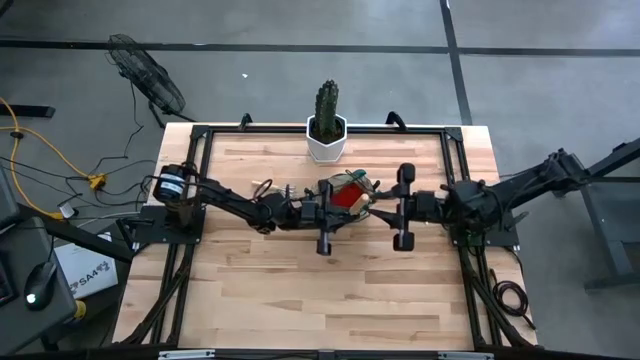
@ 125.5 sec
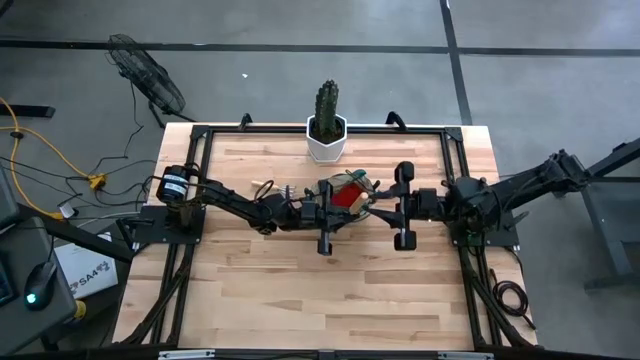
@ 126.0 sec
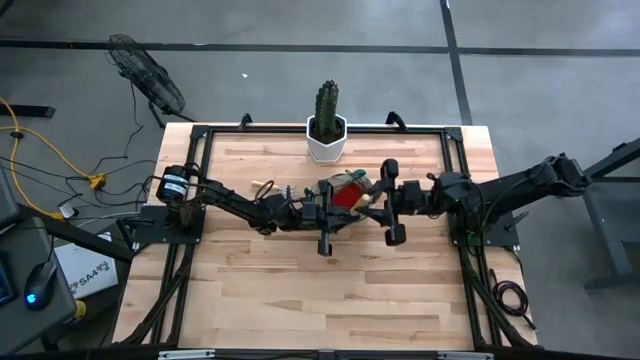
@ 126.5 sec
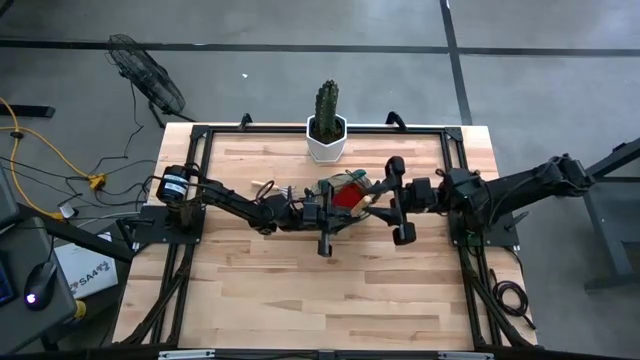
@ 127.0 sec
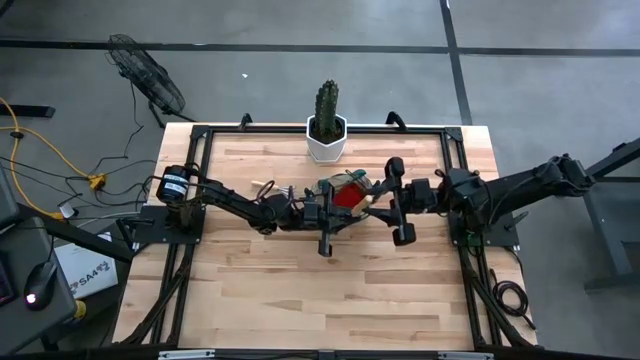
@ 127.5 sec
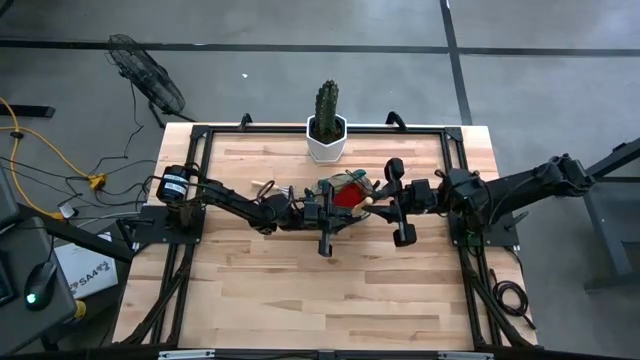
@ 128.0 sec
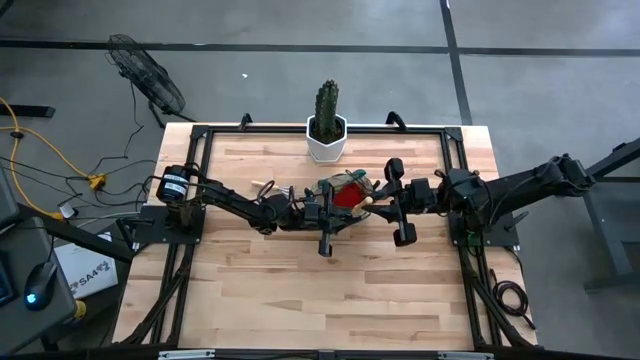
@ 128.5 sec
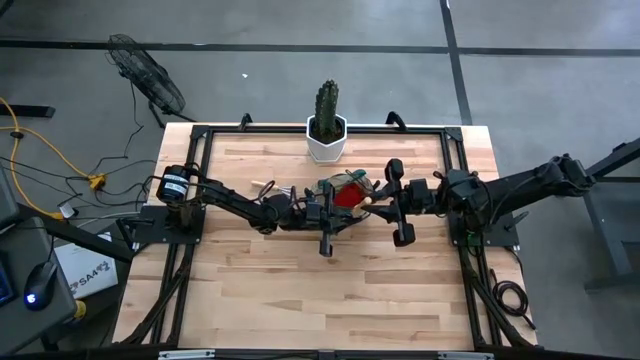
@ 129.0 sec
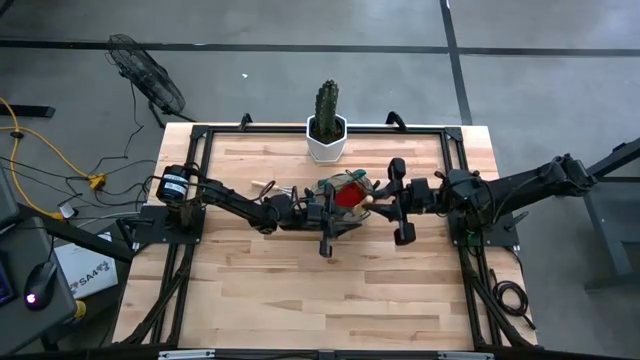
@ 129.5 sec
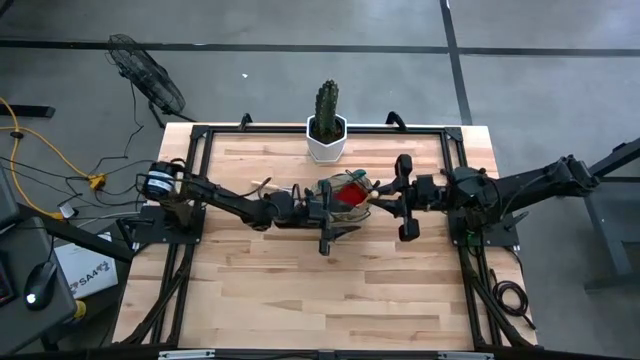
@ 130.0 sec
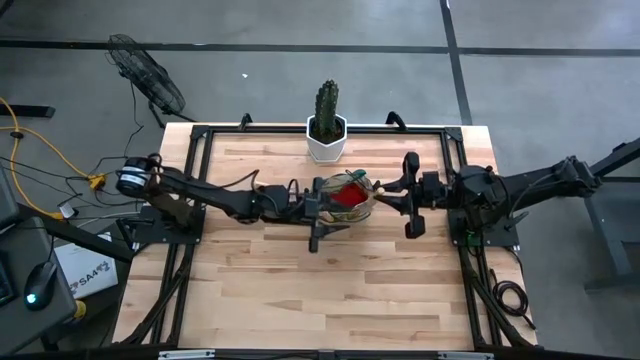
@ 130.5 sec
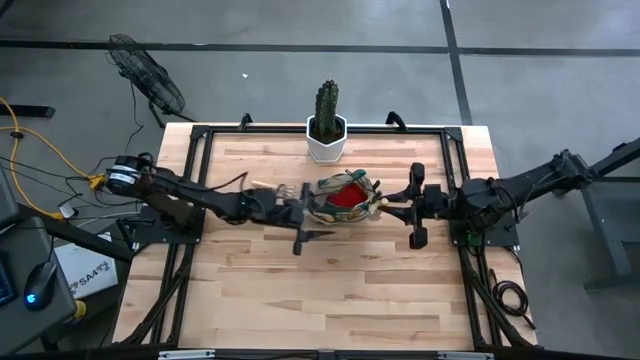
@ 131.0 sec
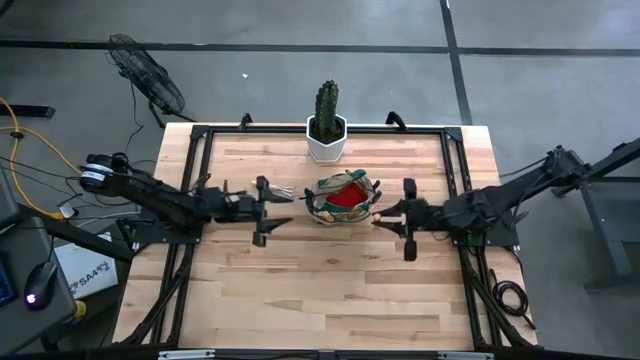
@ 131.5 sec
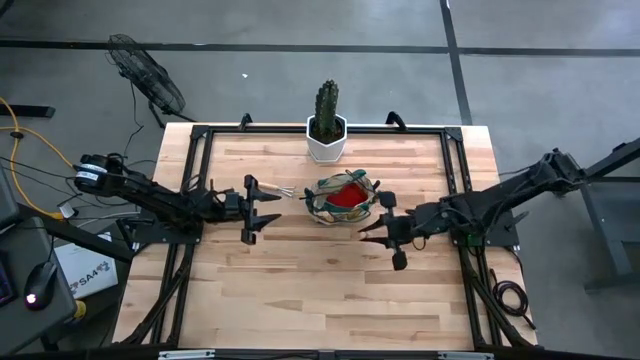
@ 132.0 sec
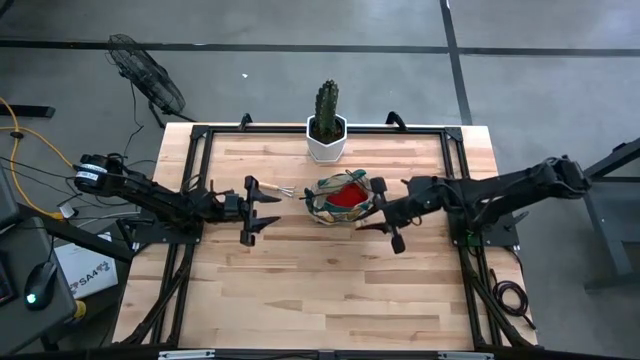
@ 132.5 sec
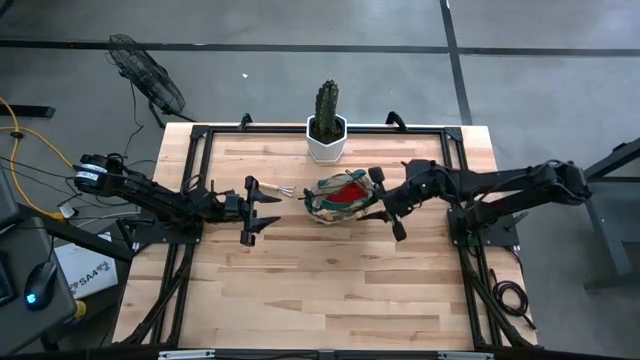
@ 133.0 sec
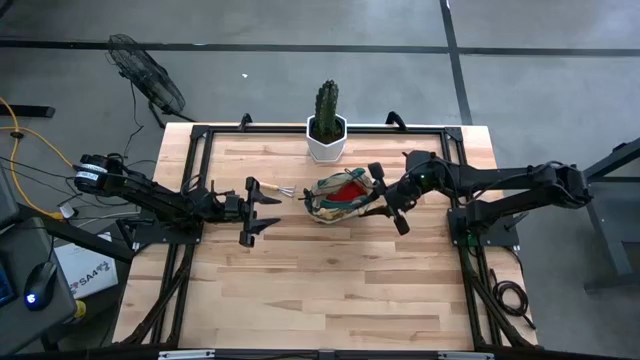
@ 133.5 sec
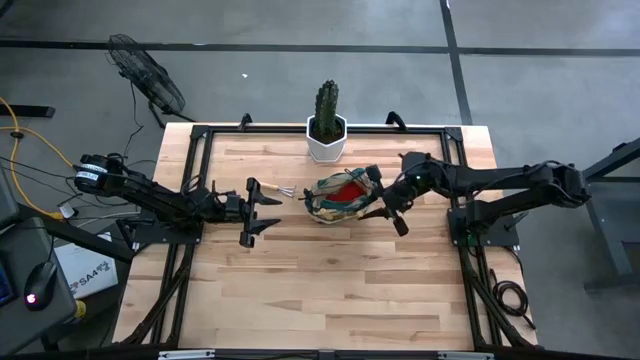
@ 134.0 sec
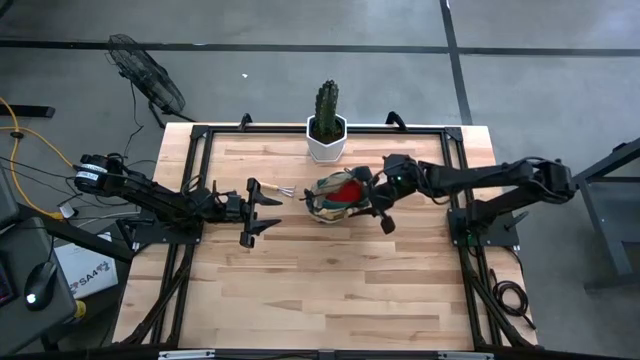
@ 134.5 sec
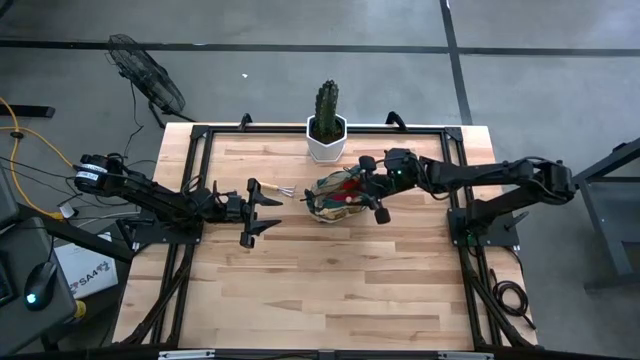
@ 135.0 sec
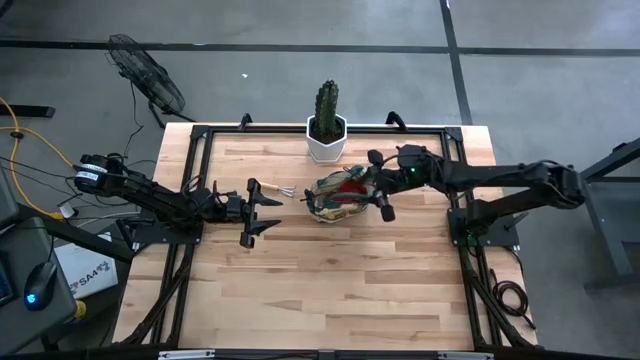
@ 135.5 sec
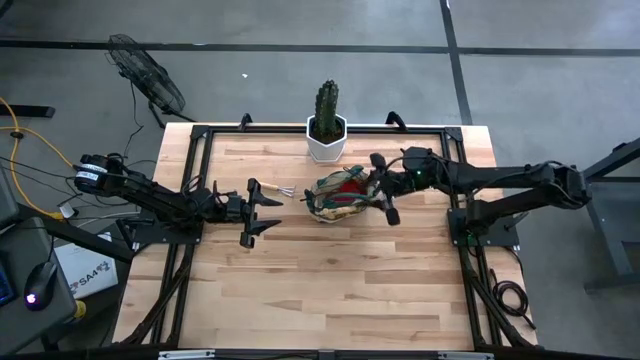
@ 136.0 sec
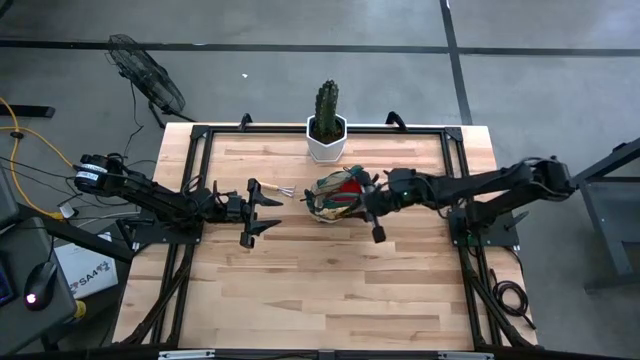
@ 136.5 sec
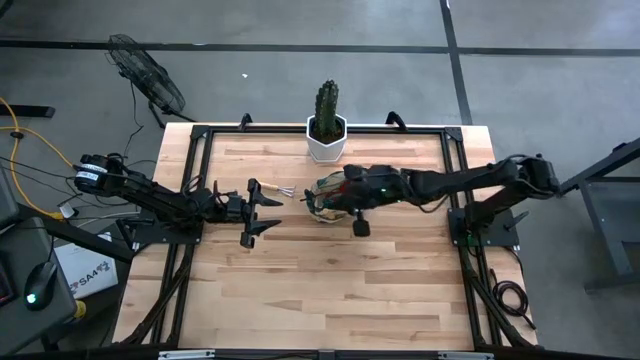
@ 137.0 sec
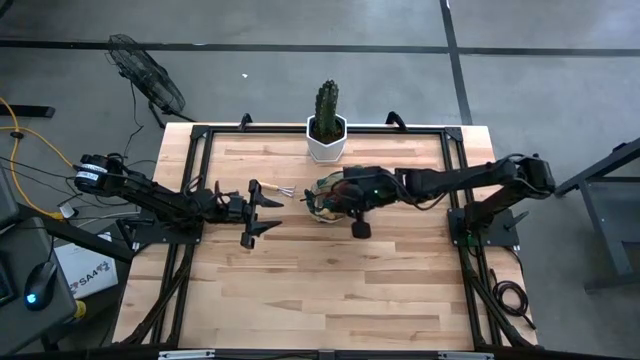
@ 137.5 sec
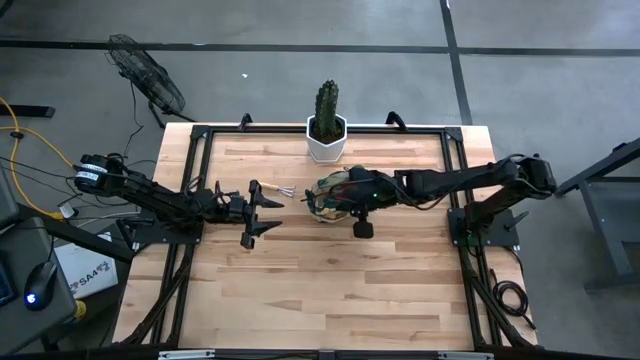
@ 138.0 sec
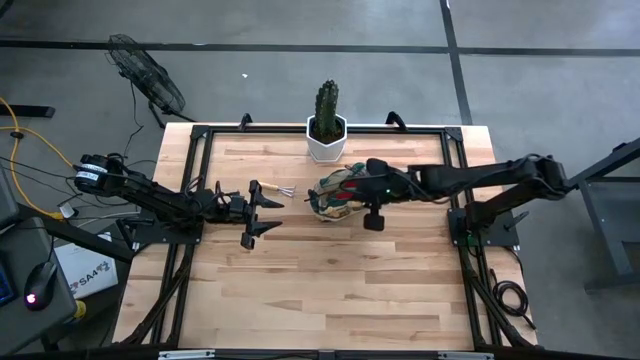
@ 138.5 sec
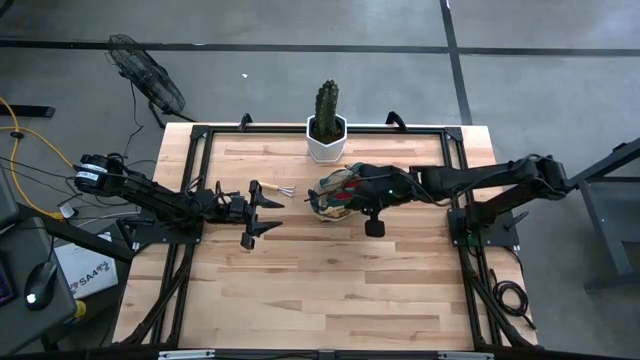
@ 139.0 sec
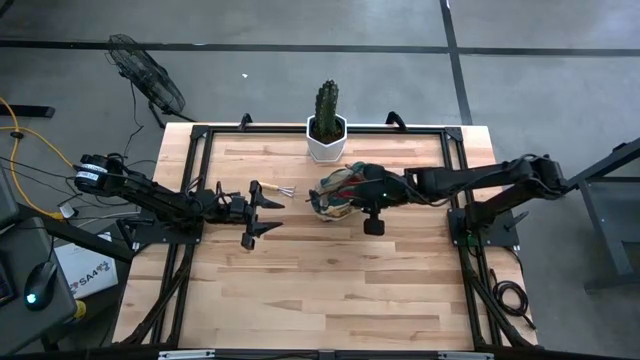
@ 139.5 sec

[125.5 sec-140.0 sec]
Task: Pick & Place Garden tools in Gardening bag
Put the brown trowel into the brown gardening bag

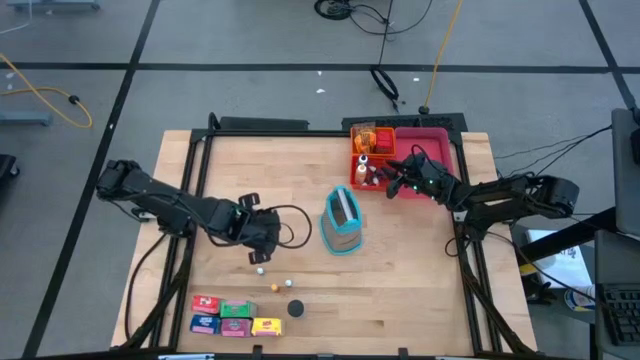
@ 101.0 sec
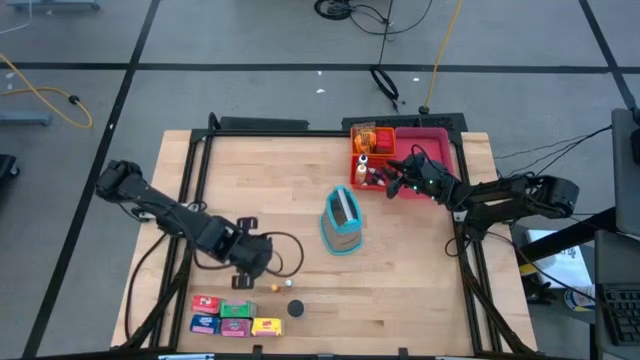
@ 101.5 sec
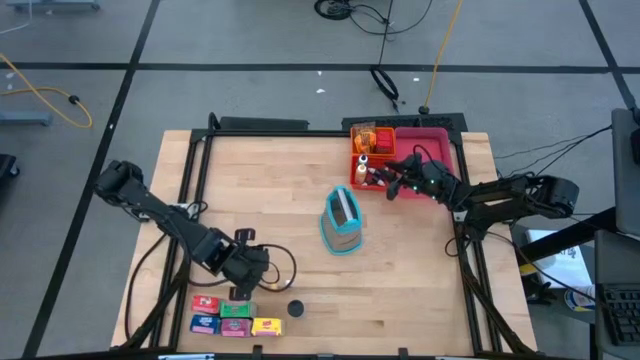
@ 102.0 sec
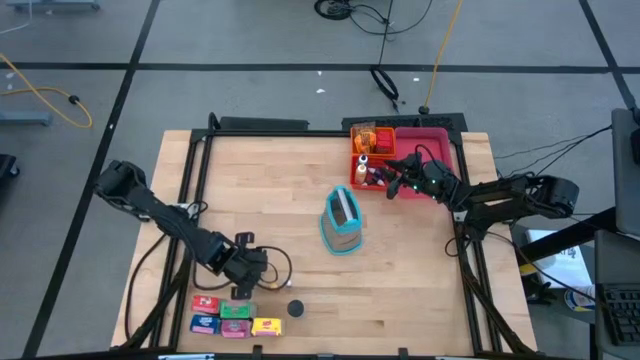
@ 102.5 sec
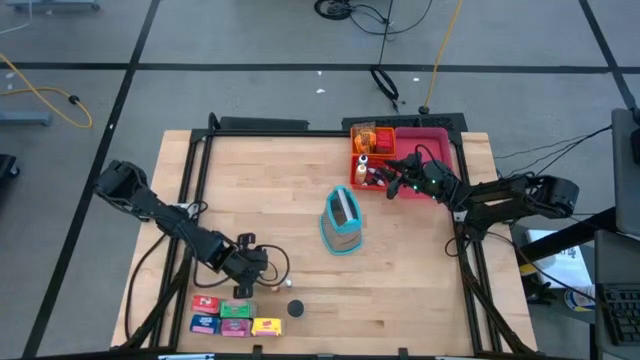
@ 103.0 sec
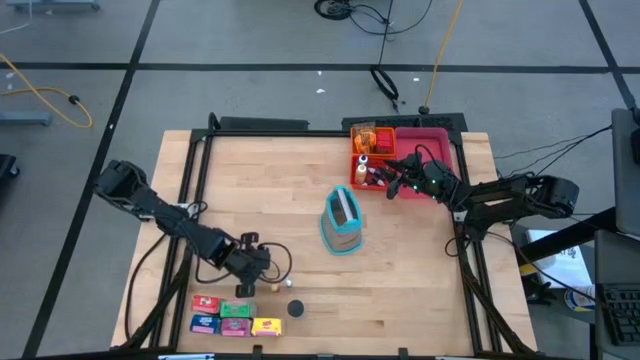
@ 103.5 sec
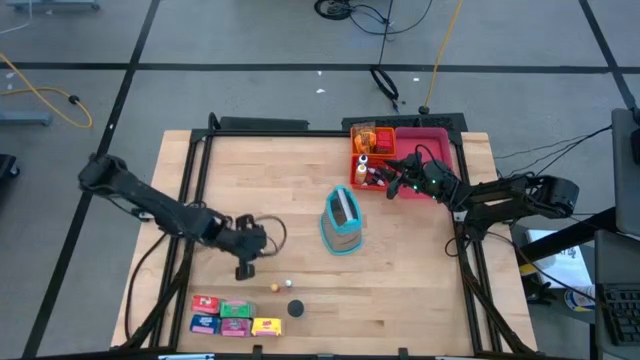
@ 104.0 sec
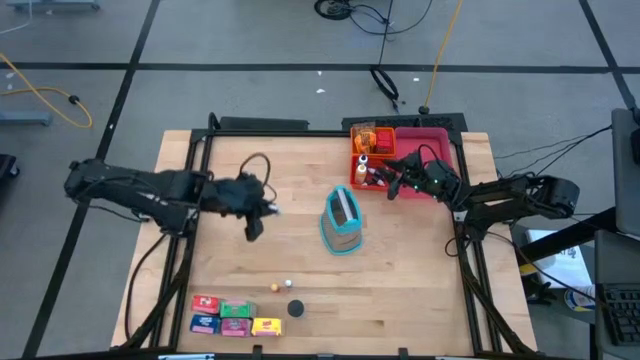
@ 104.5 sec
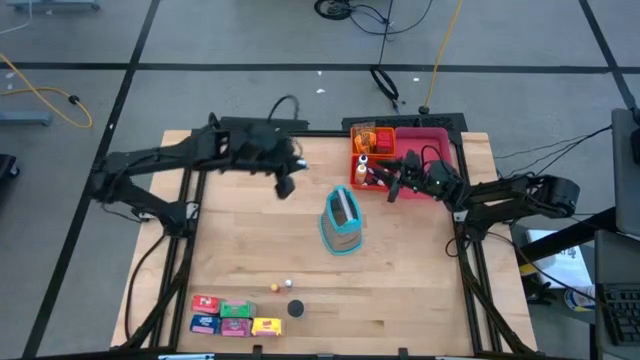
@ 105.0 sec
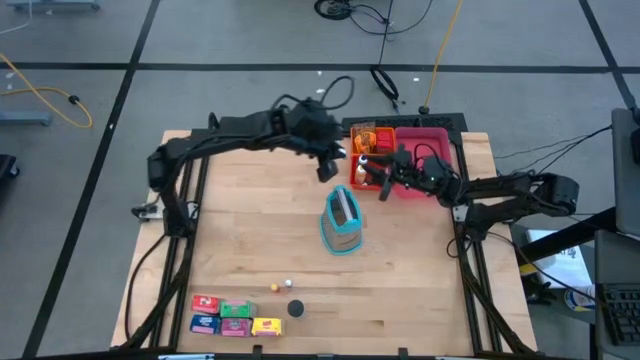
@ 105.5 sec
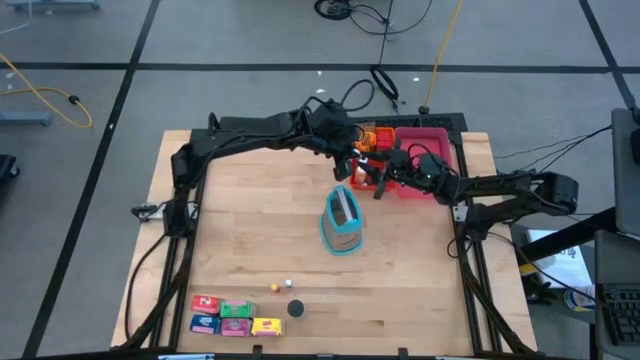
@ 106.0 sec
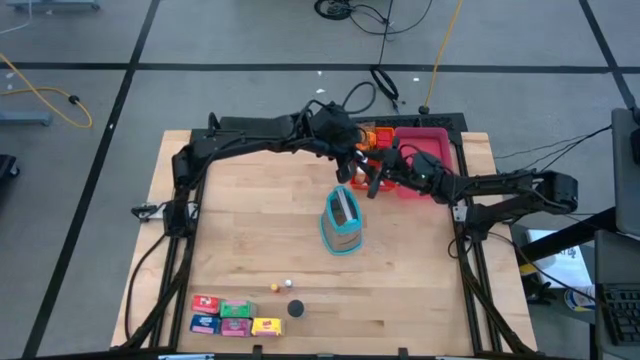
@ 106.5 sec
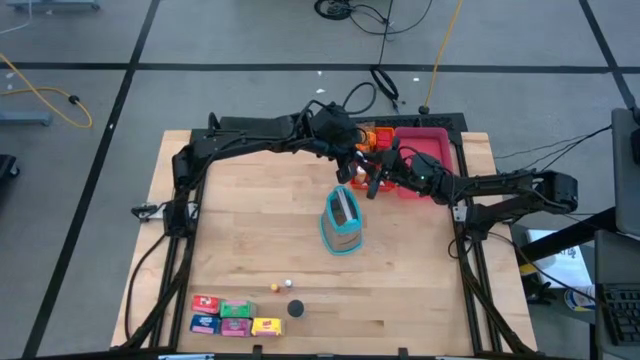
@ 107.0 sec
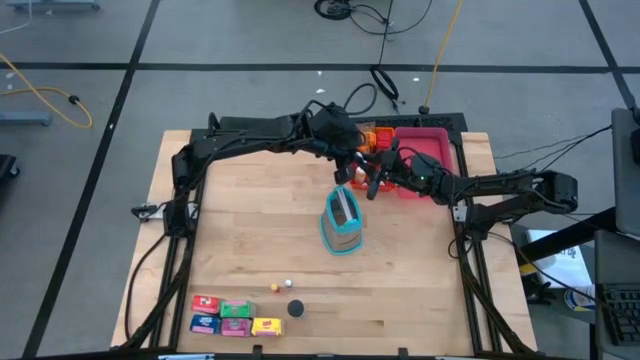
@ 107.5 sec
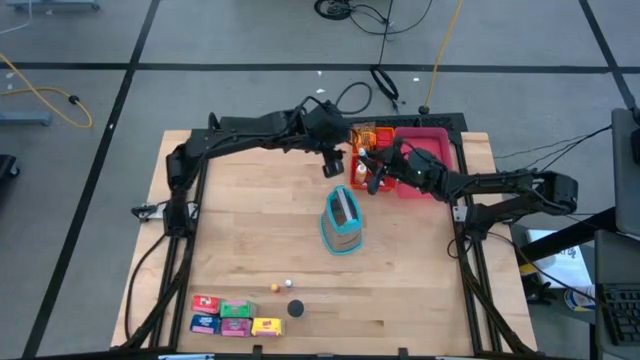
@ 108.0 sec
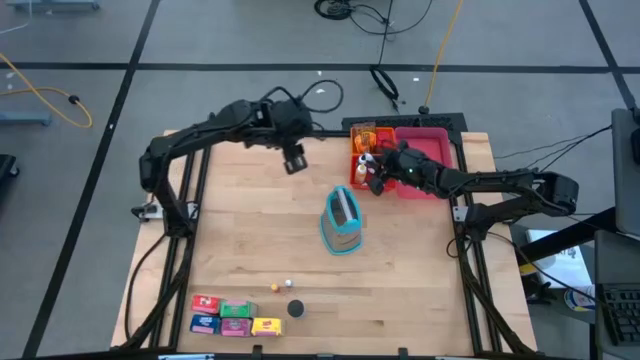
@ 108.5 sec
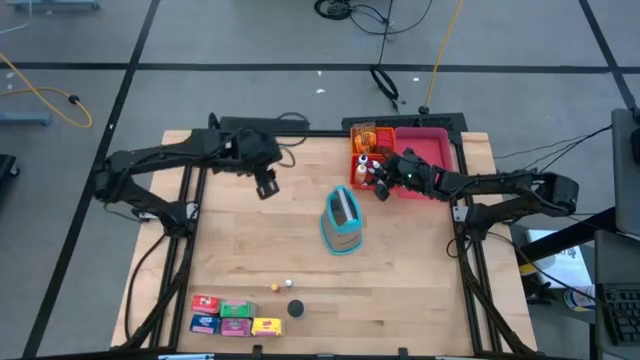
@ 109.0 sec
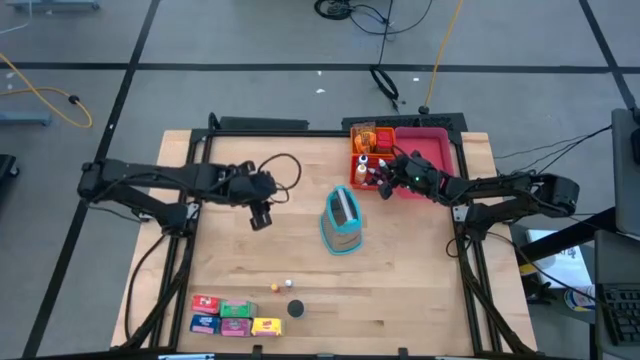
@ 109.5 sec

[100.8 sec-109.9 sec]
Task: Pick & Place Kitchen Items
Put the small green food coloring bottle into the red bin
